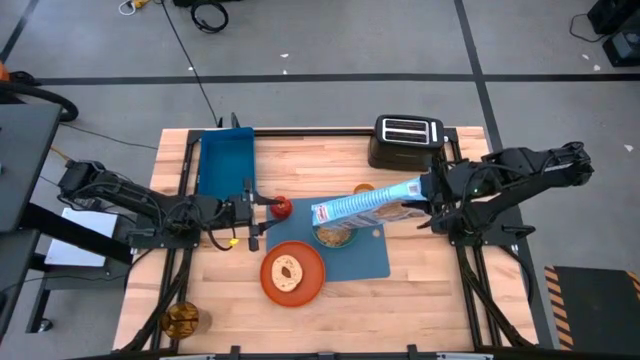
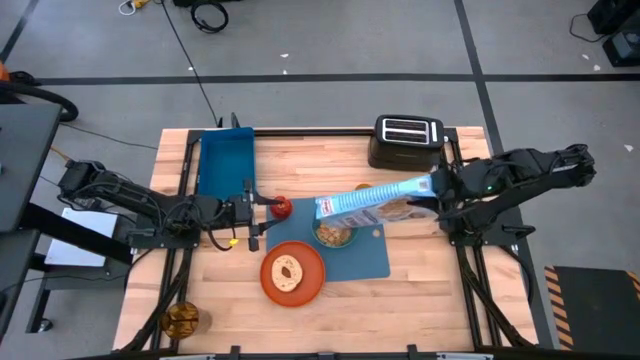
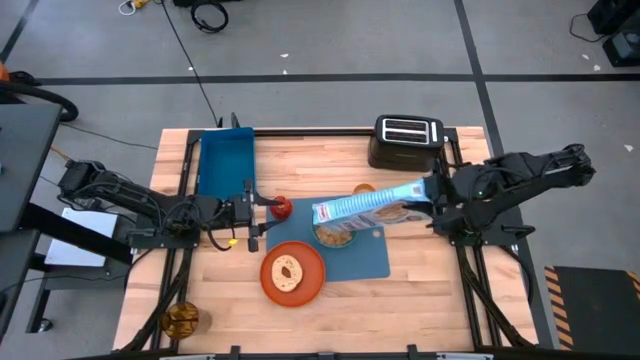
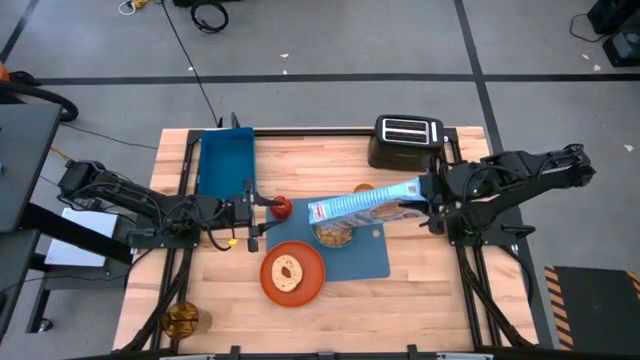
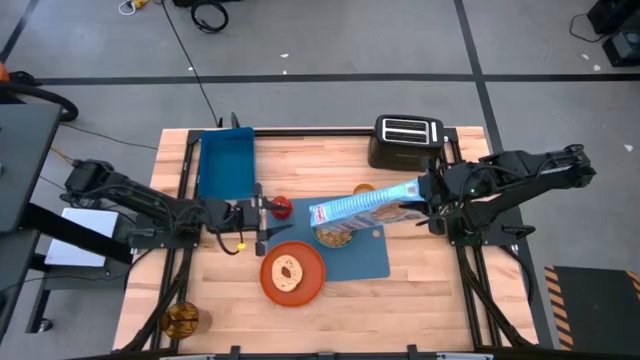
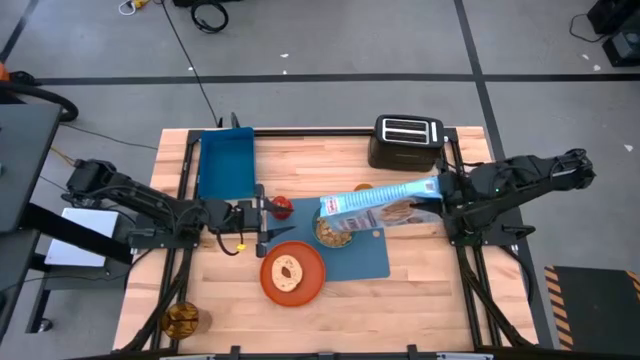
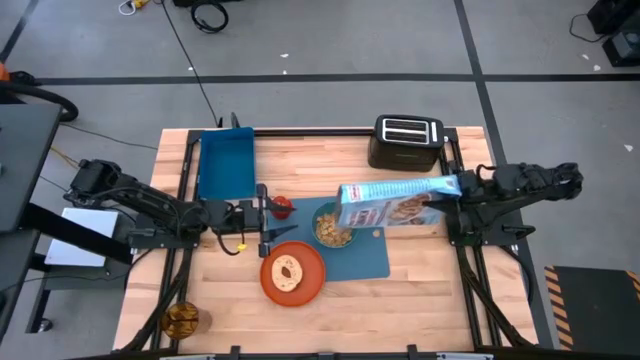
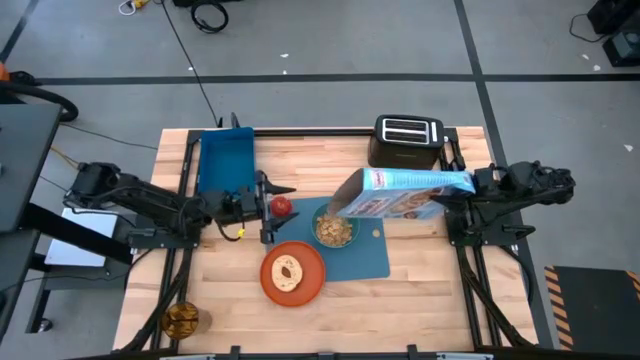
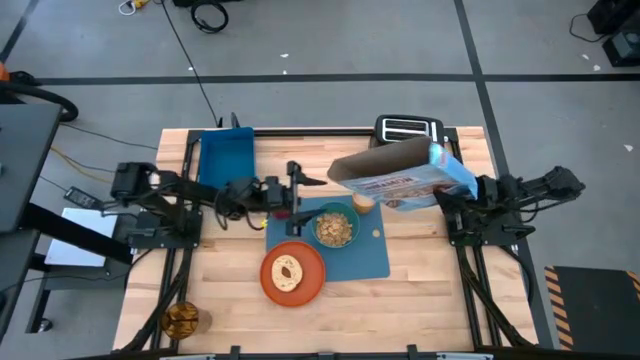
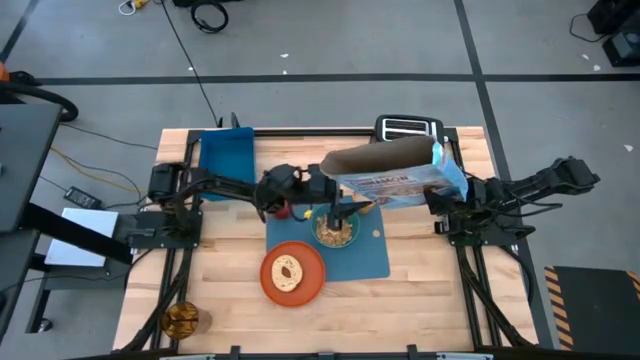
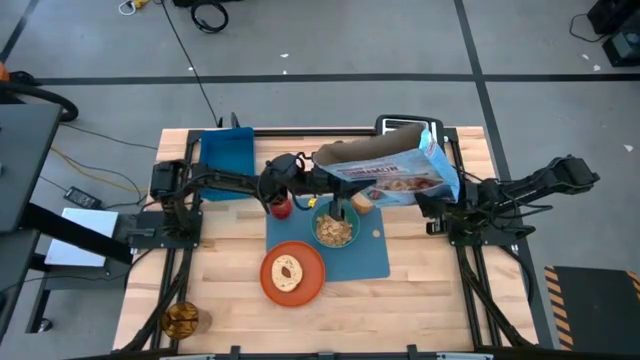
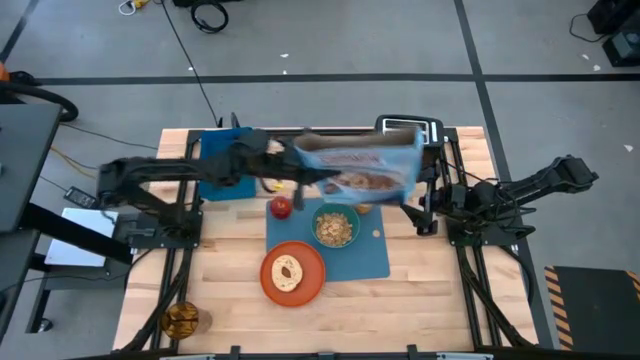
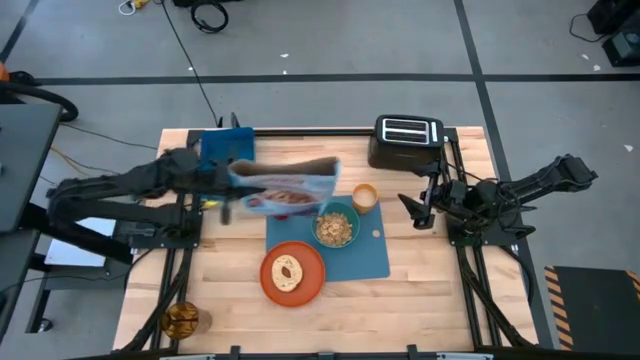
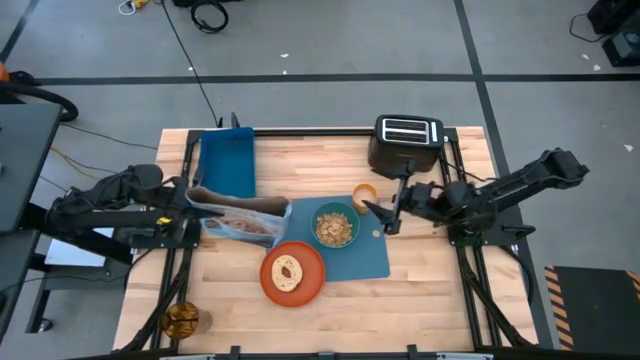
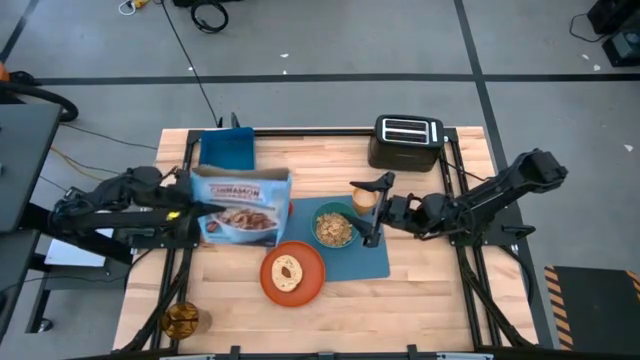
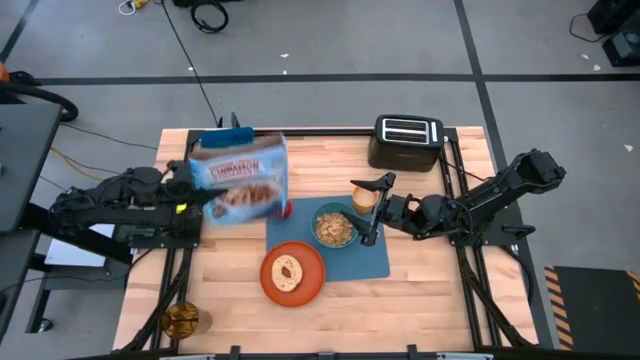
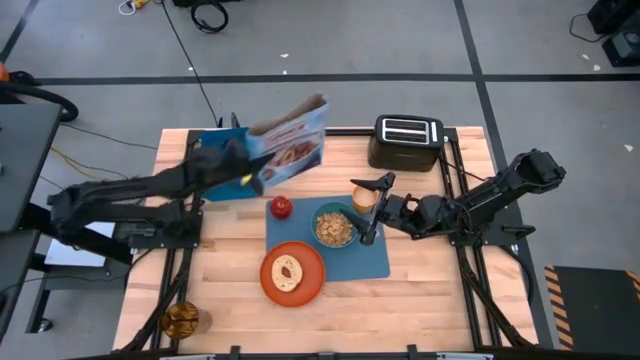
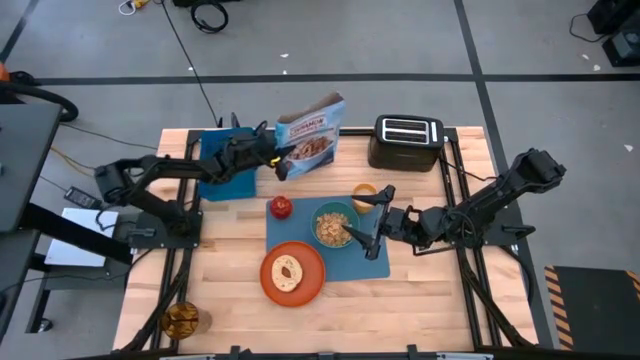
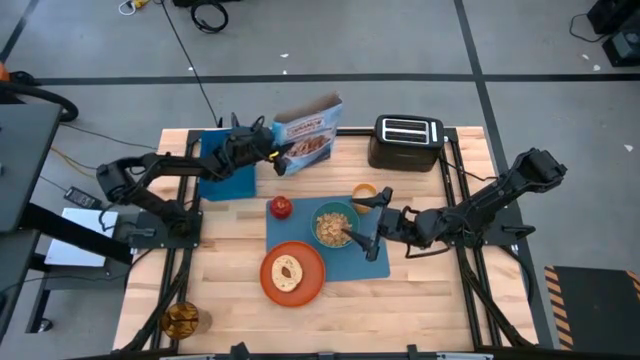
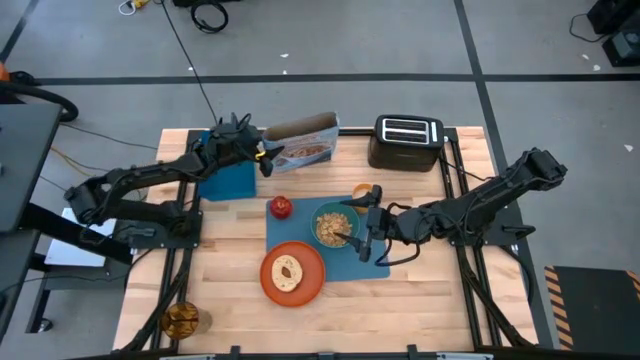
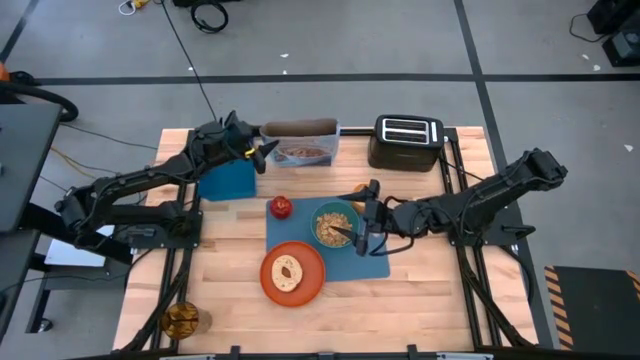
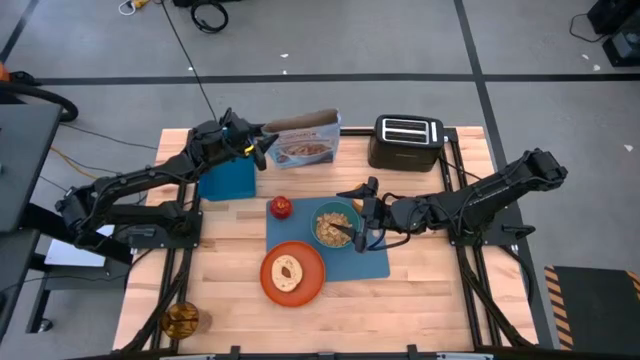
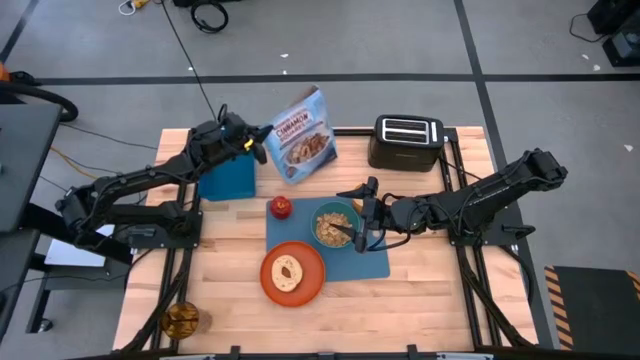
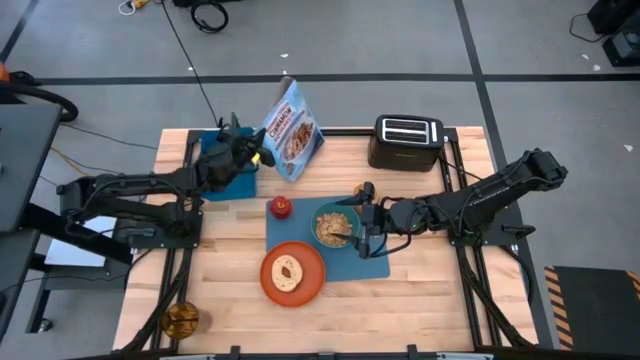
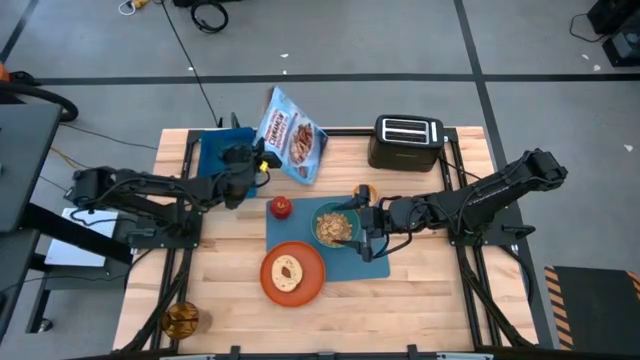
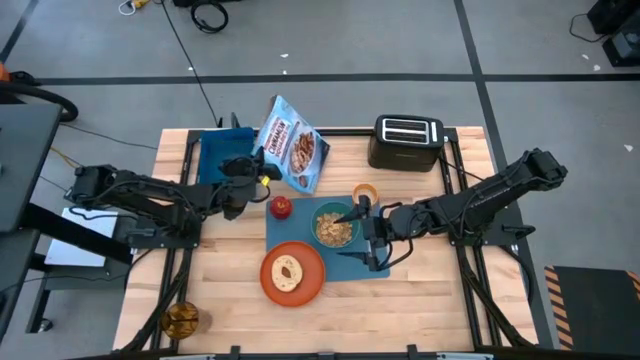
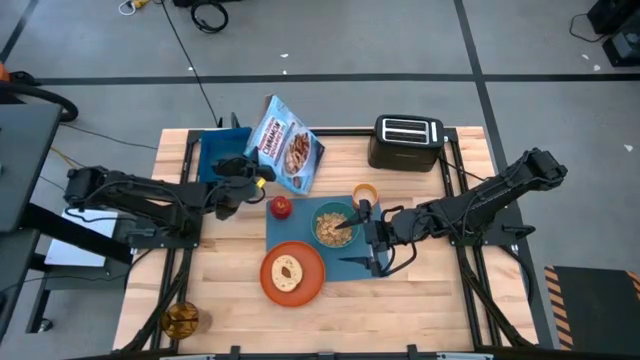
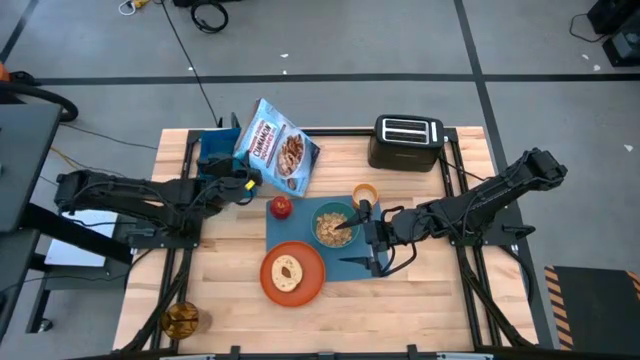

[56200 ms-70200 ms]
Task: Arrange a breakfast setting
Pour the cereals from the blue cereal box into the green bowl

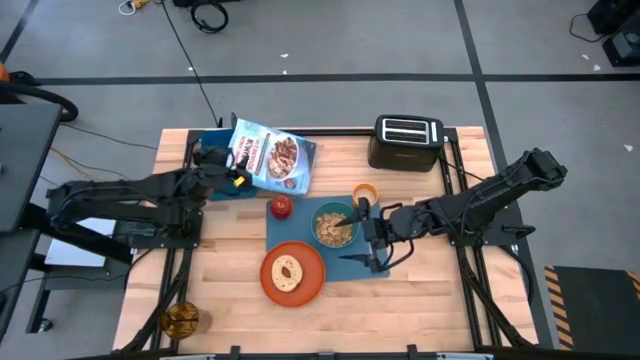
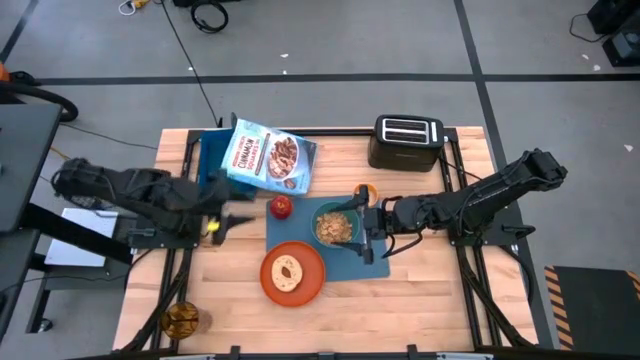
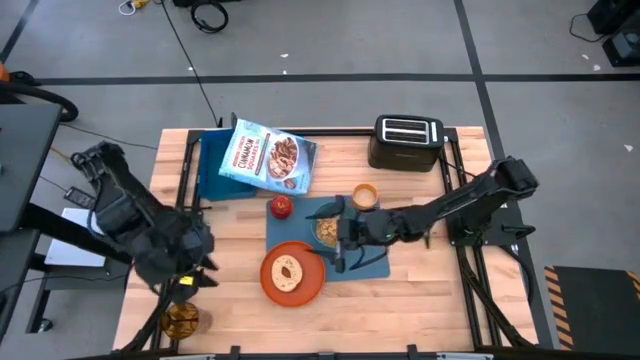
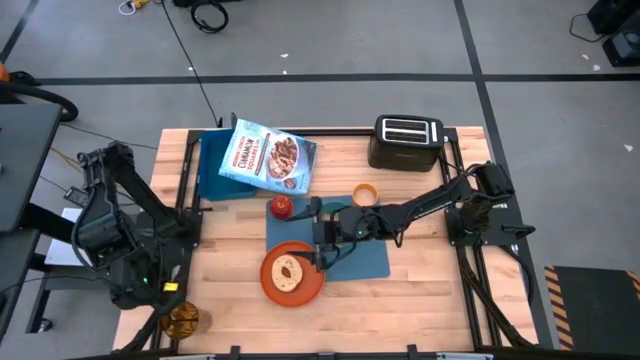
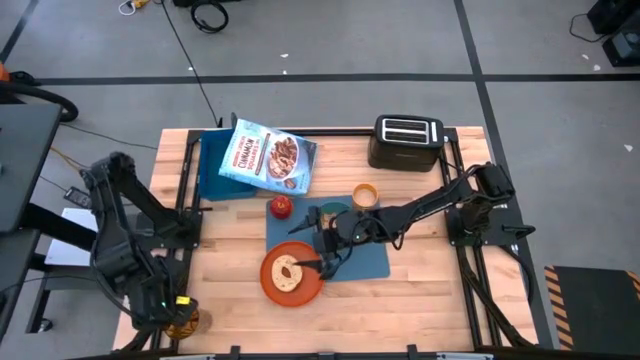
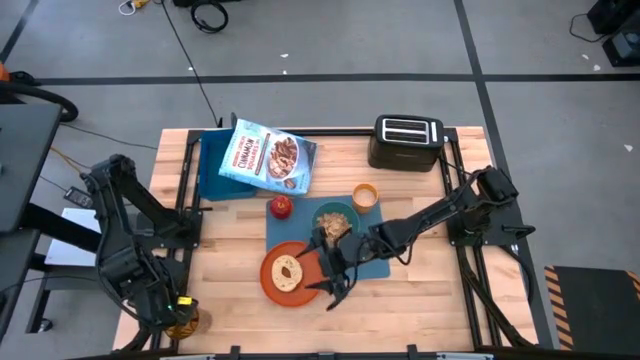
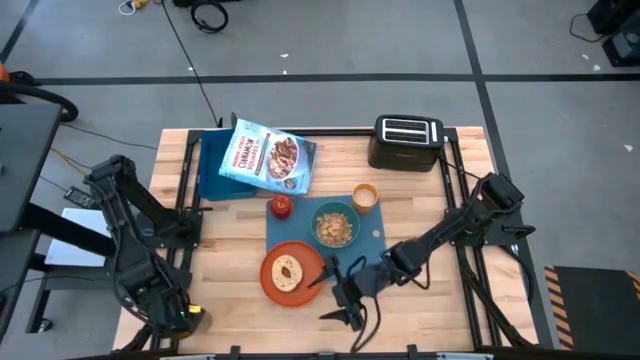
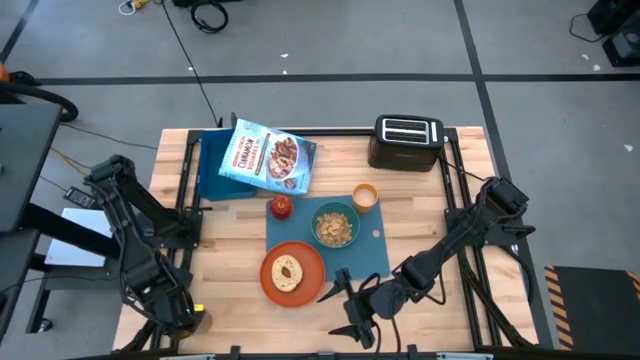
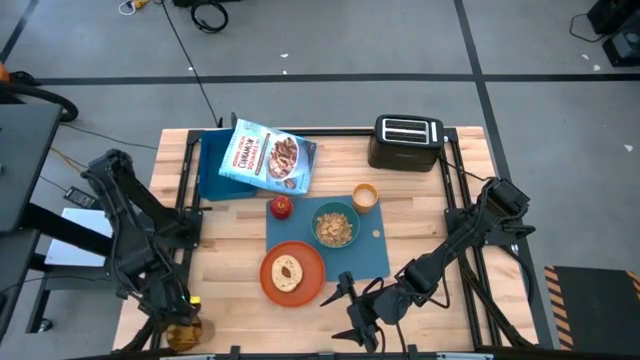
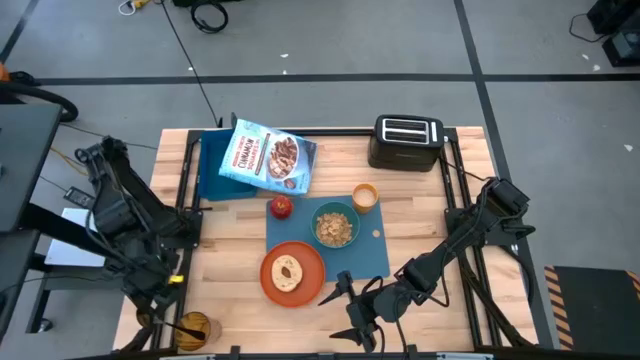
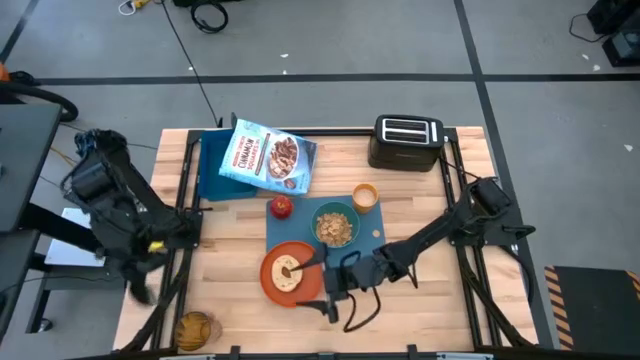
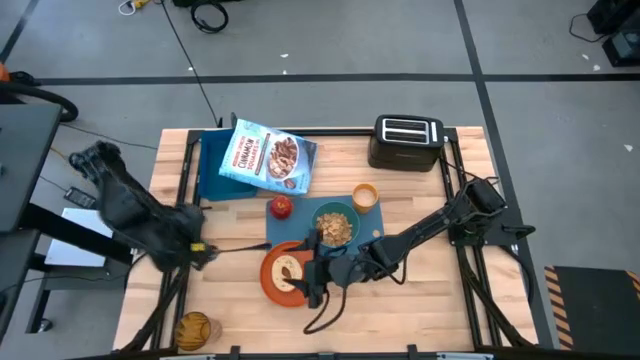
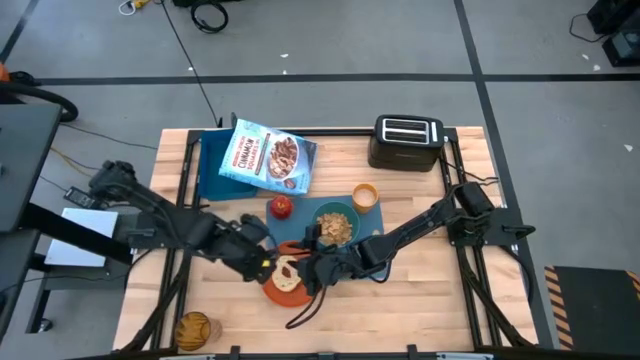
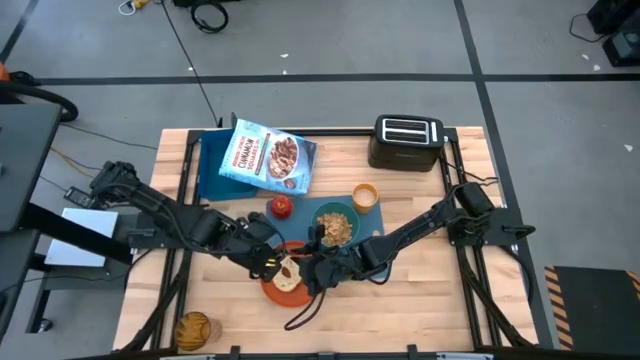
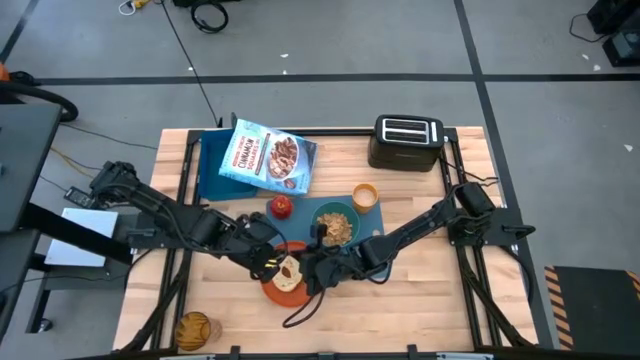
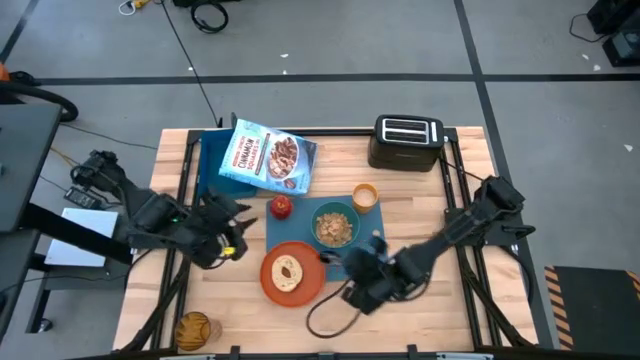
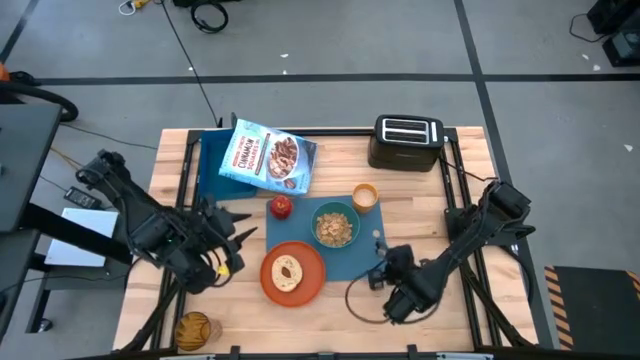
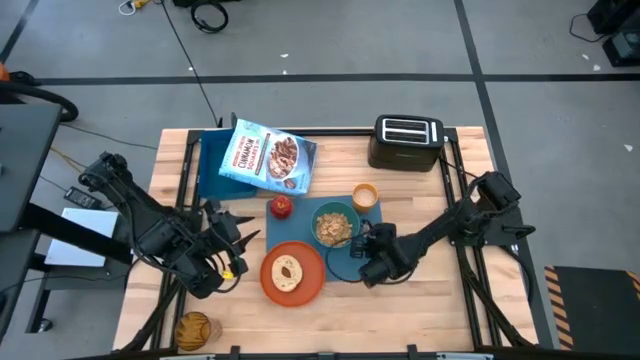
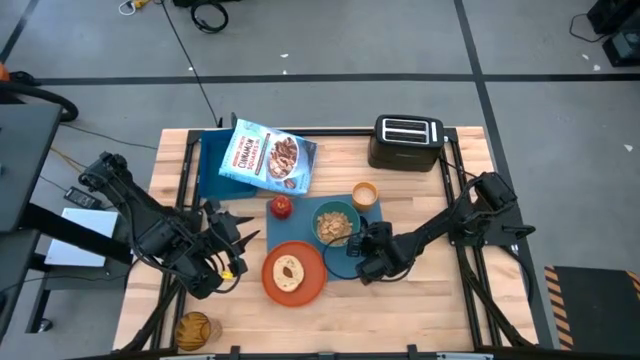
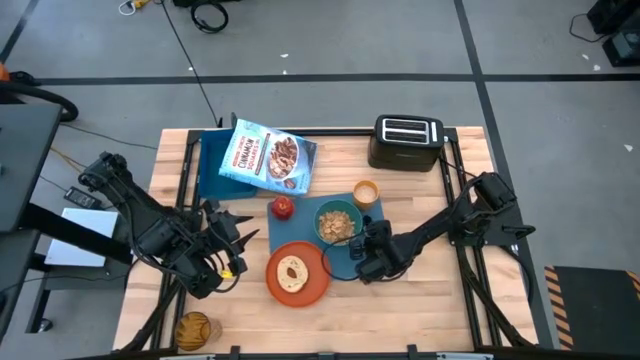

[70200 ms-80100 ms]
Put the black spoon on the blue table mat to the bottom right of the green bowl
